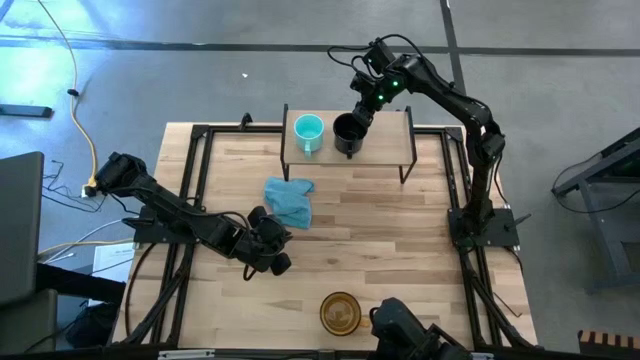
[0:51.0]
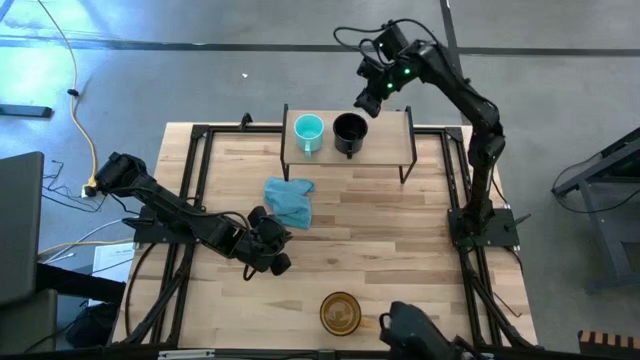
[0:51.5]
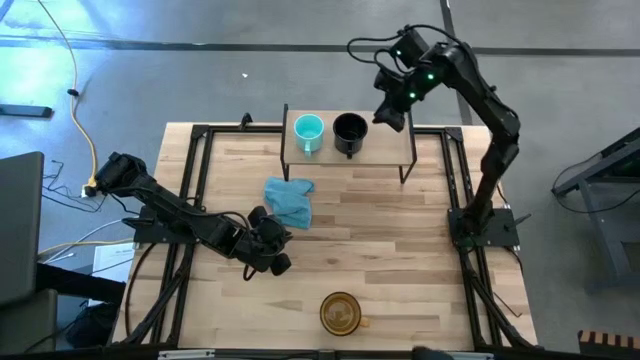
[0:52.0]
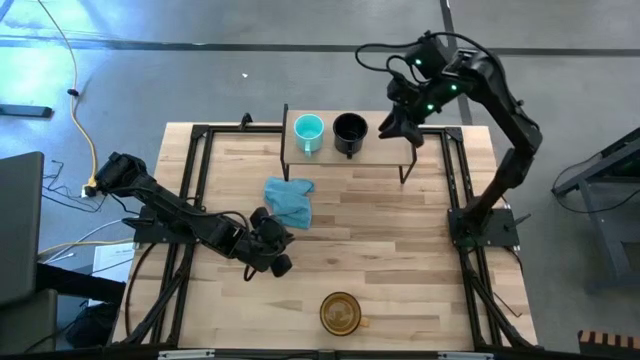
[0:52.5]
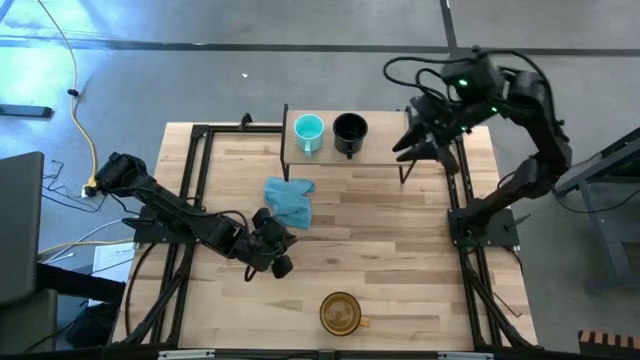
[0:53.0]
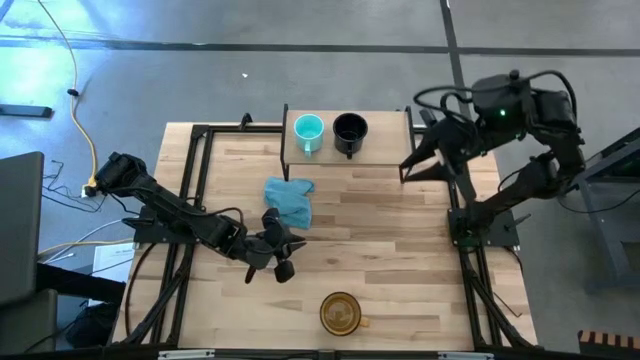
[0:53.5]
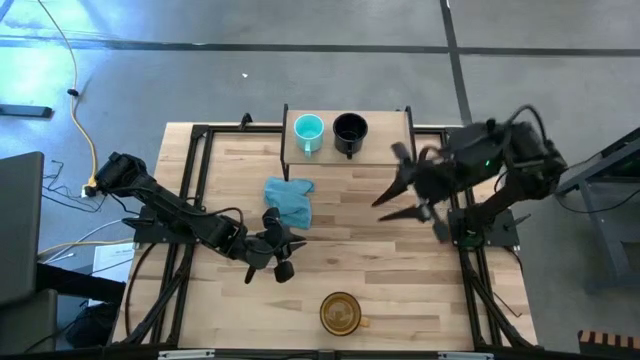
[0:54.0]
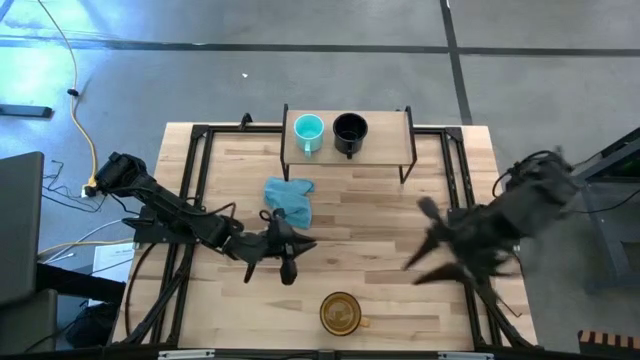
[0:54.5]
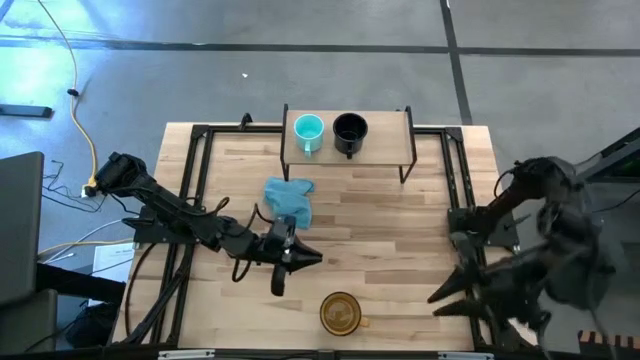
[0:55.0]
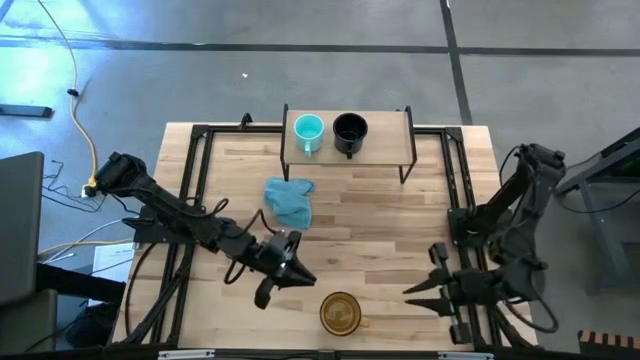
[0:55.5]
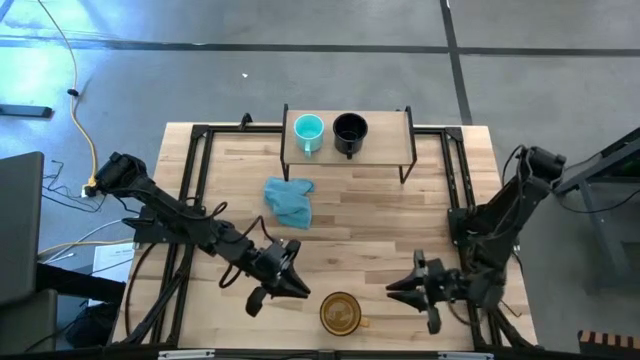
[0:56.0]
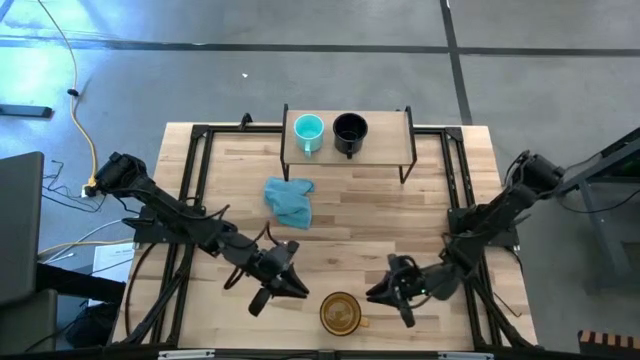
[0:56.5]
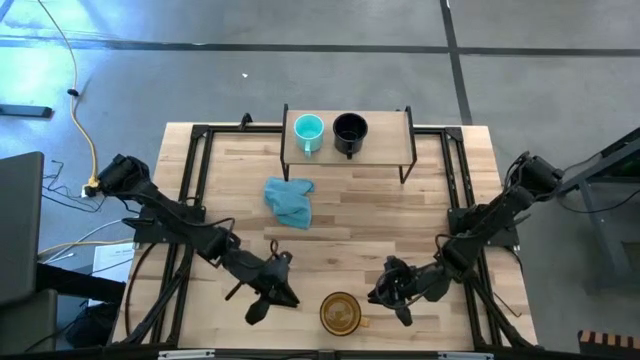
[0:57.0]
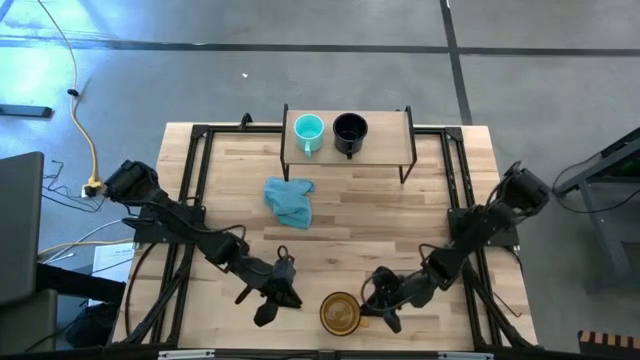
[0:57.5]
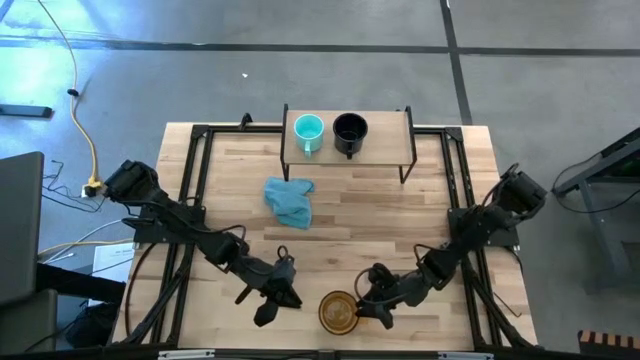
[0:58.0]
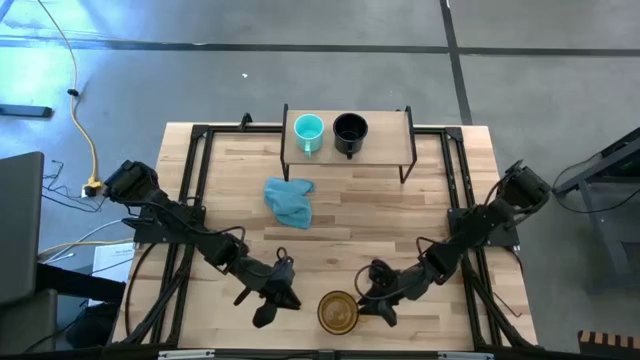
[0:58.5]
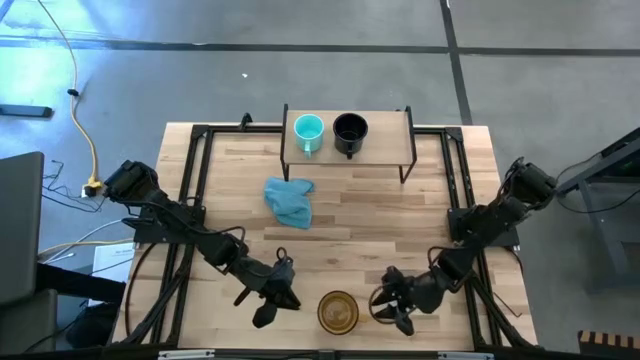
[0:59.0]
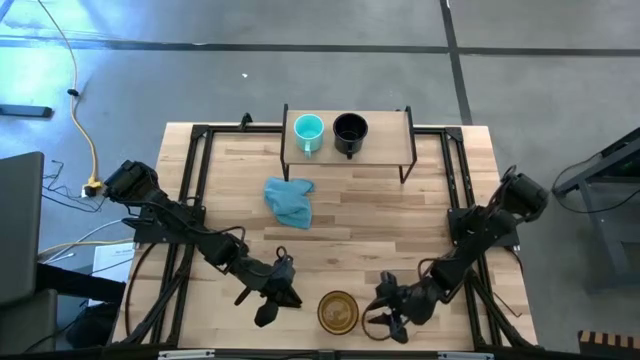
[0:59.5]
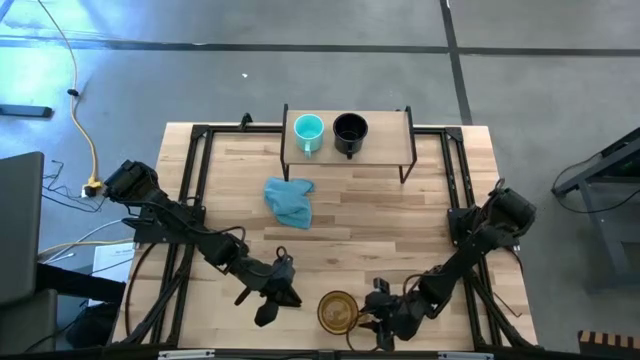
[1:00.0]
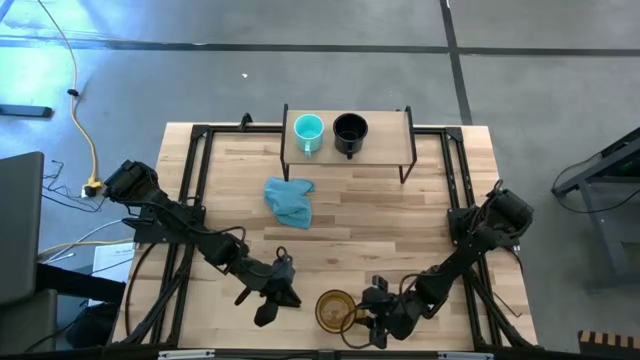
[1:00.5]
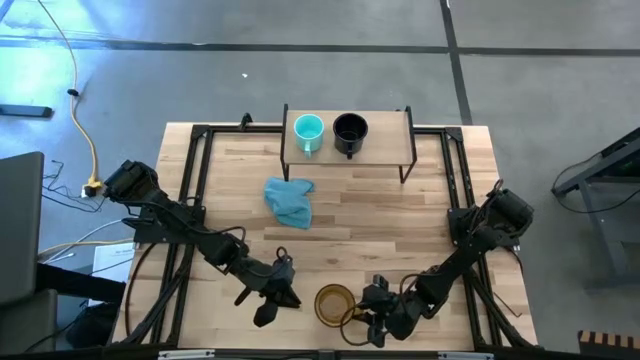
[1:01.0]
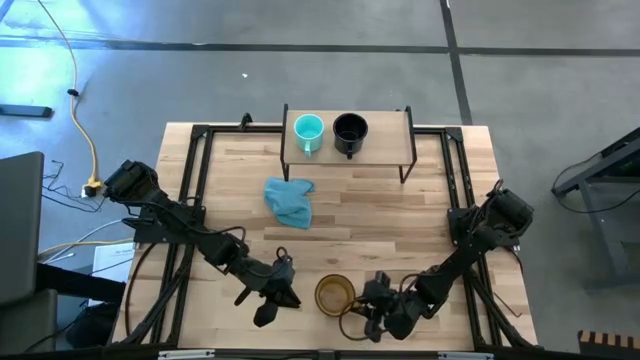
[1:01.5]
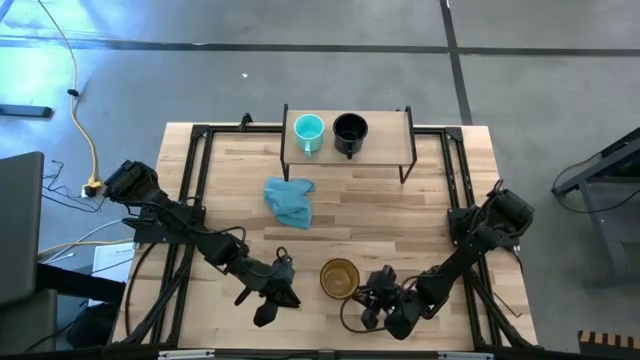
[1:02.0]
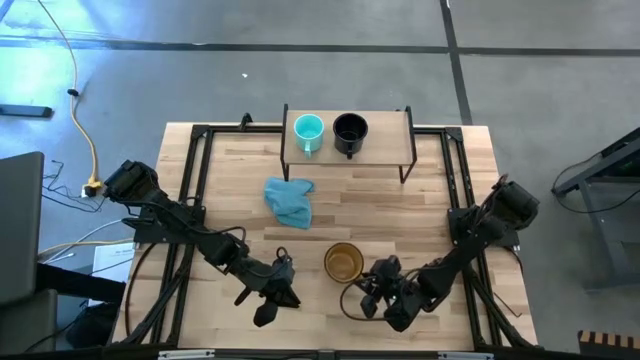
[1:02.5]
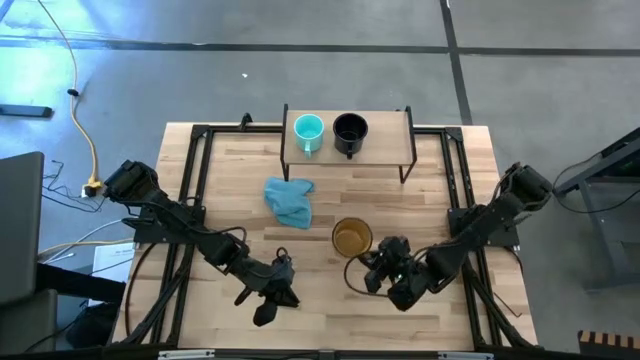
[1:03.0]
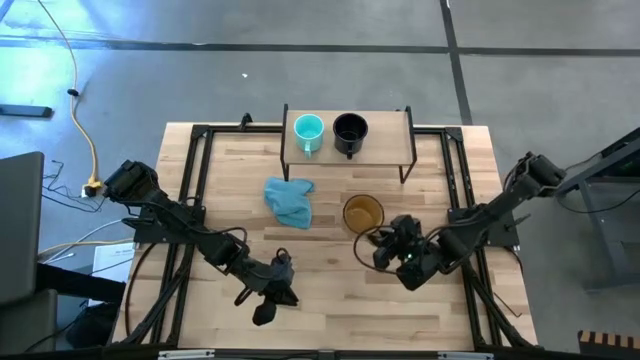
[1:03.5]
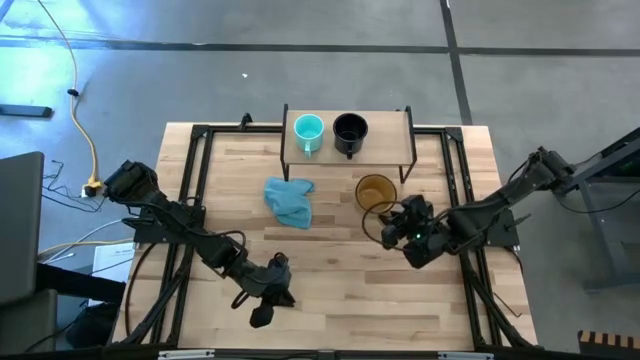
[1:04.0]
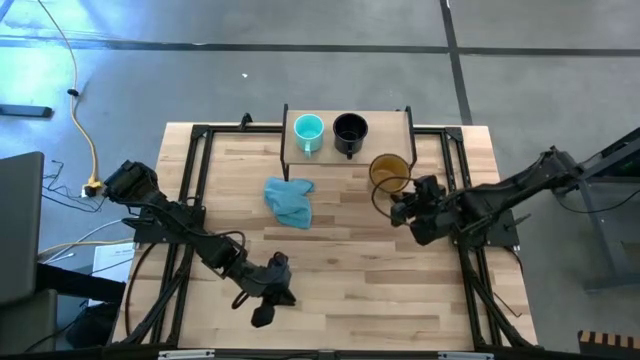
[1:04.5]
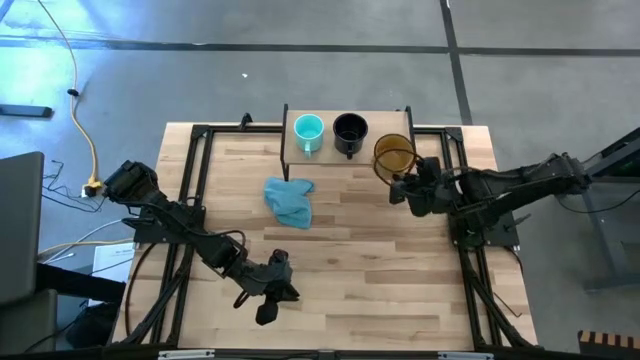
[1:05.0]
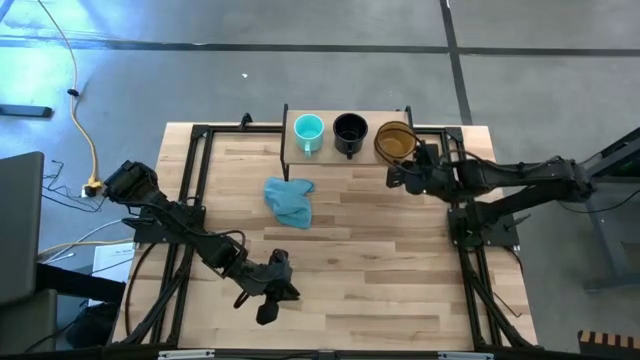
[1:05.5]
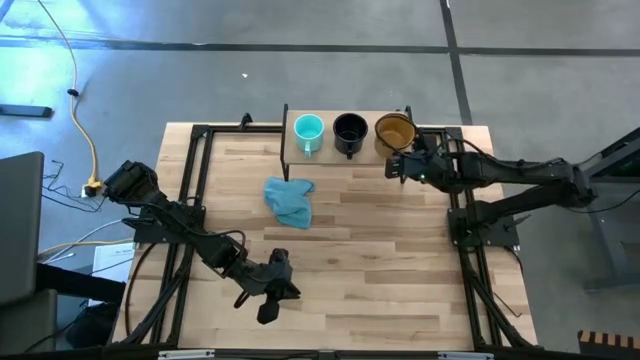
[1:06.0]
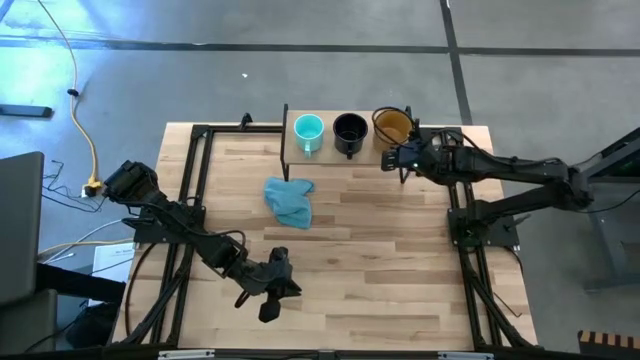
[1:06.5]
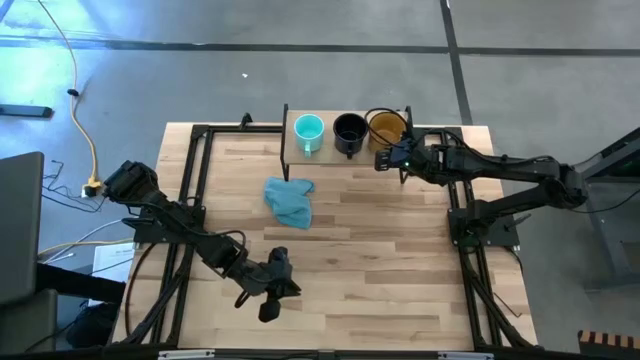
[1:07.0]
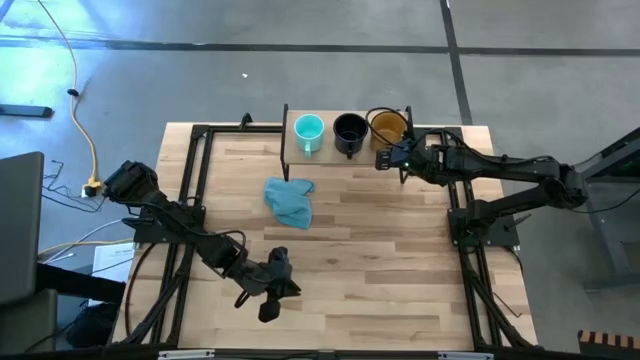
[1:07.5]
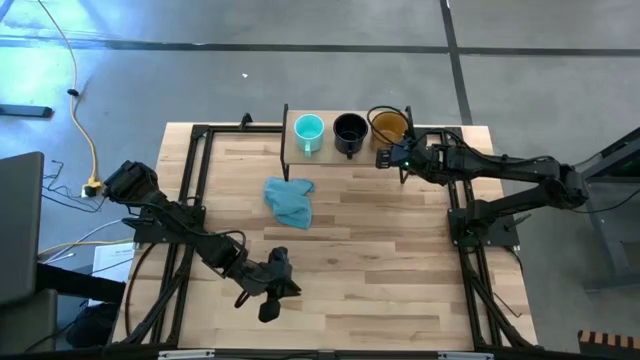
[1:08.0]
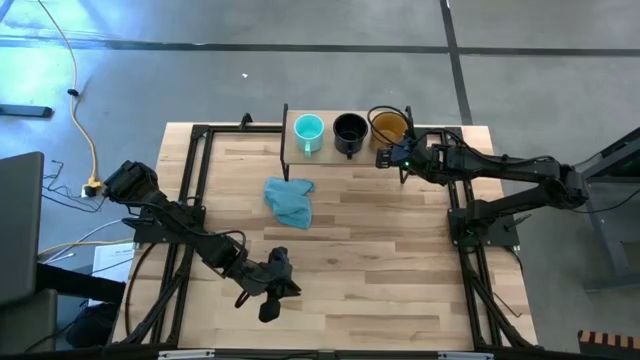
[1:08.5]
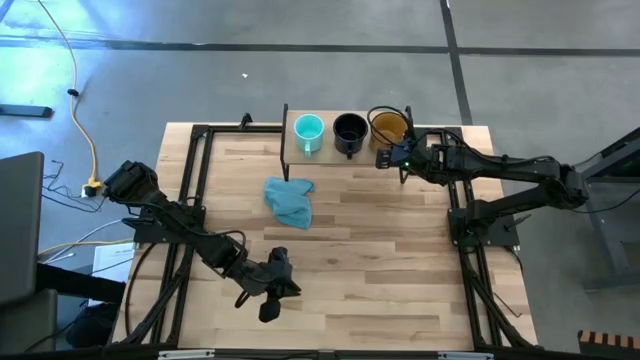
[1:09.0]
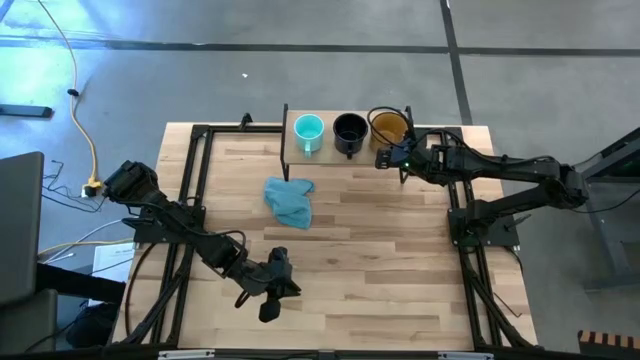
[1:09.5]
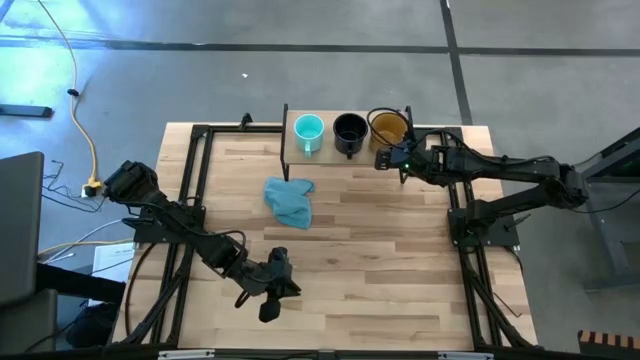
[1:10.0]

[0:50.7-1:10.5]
Task: Stack small to large cups/mugs on shelf
Put the yellow mug on the shelf

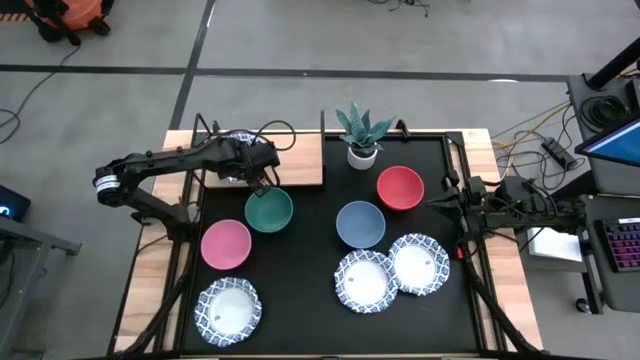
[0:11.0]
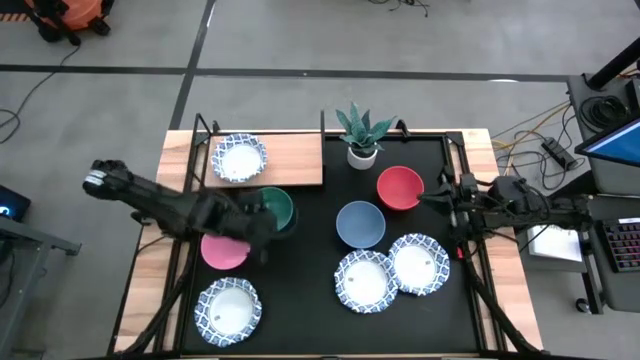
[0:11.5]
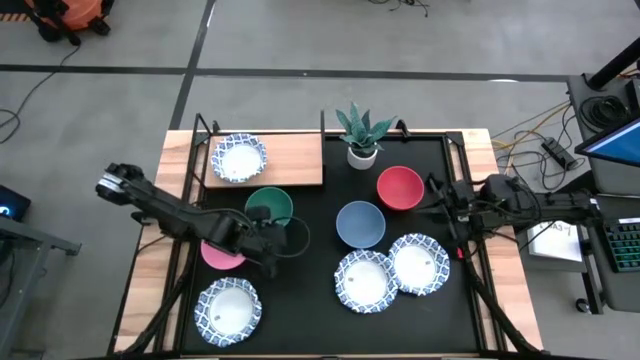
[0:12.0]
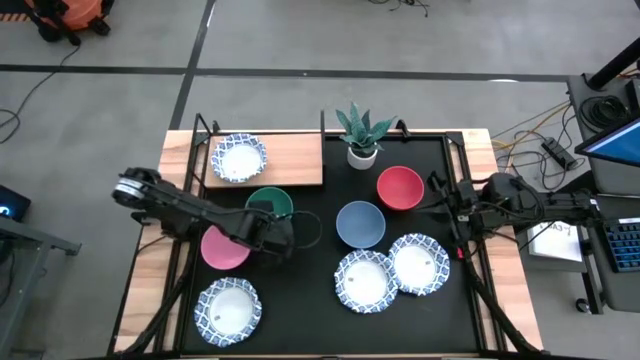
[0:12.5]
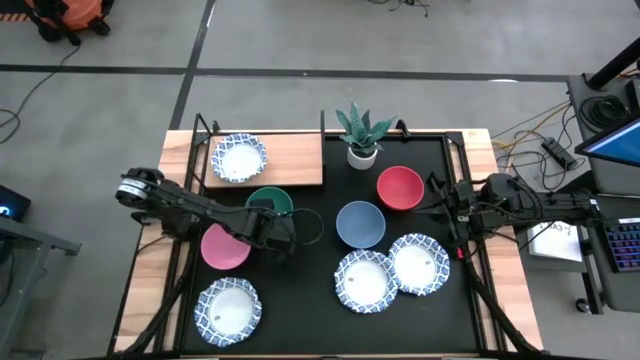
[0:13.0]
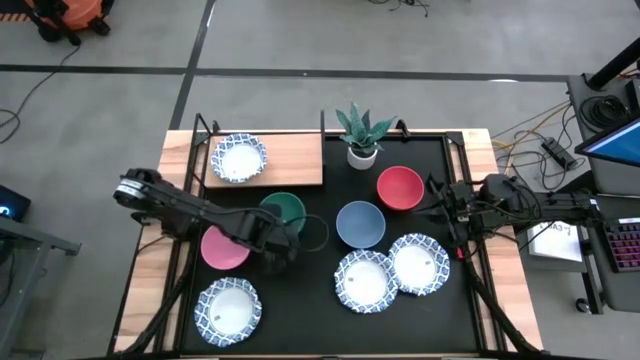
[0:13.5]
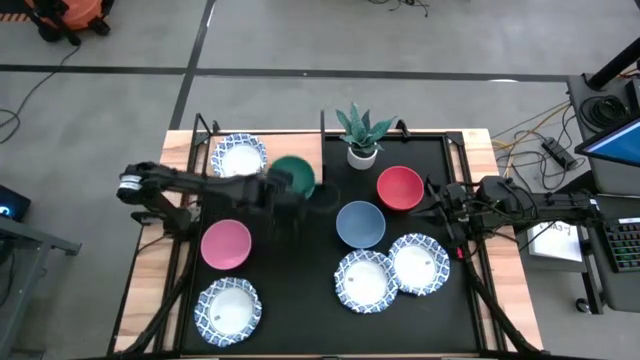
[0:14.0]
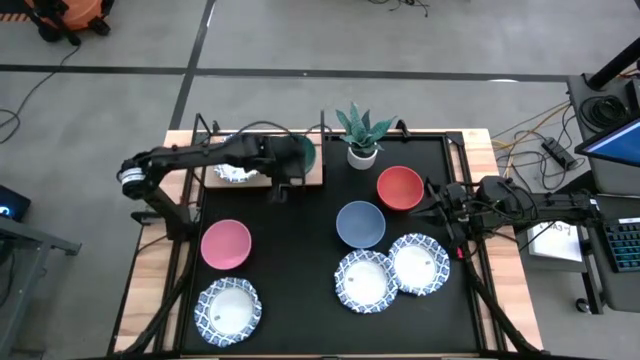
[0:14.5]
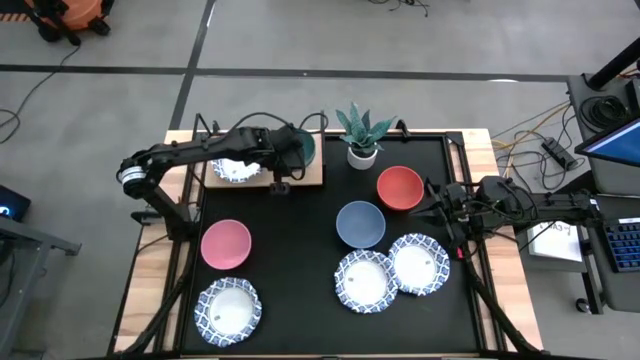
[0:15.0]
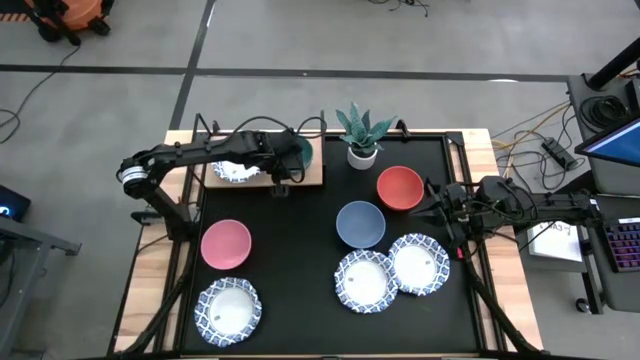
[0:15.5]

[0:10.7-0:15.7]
Task: Place and stack bowls onto a shelf
Put the green bowl on the shelf
